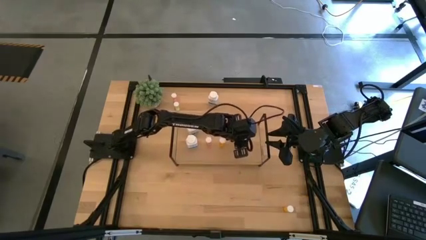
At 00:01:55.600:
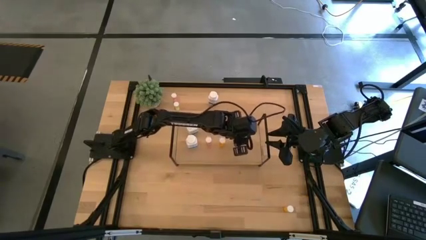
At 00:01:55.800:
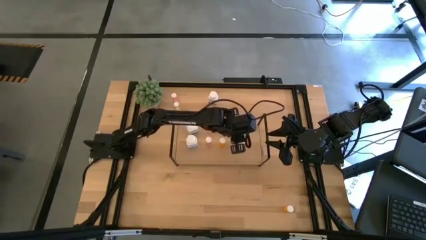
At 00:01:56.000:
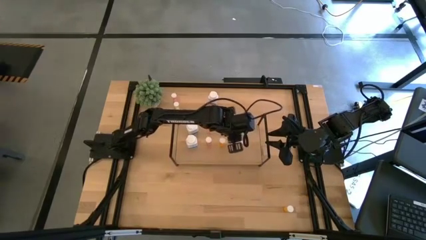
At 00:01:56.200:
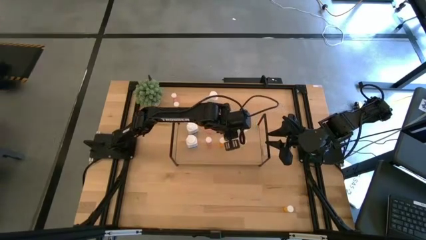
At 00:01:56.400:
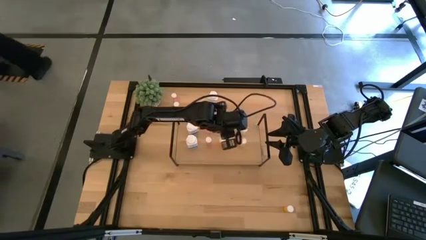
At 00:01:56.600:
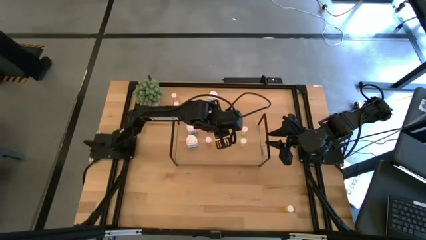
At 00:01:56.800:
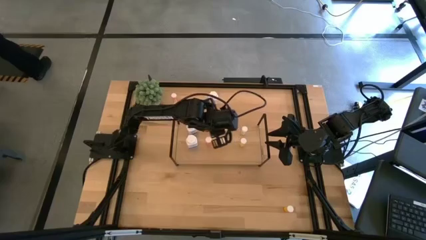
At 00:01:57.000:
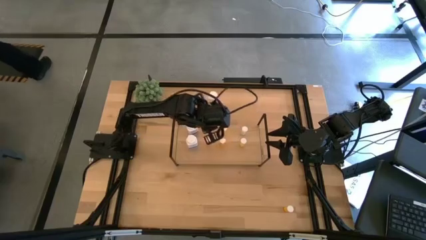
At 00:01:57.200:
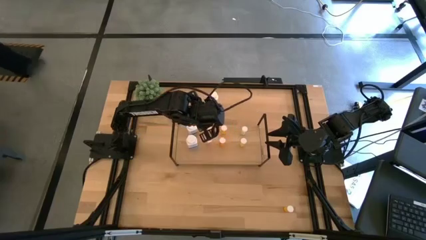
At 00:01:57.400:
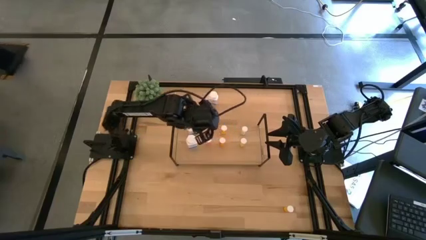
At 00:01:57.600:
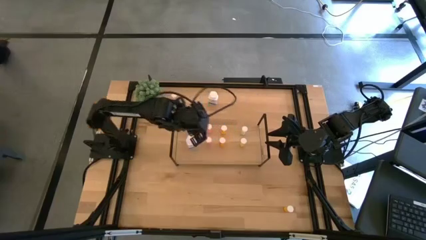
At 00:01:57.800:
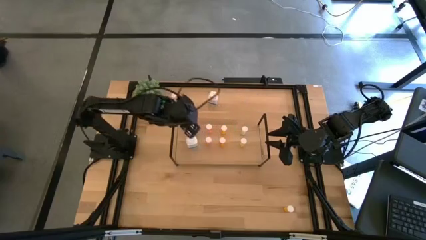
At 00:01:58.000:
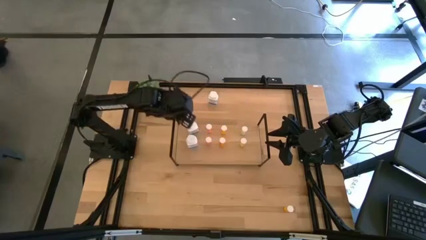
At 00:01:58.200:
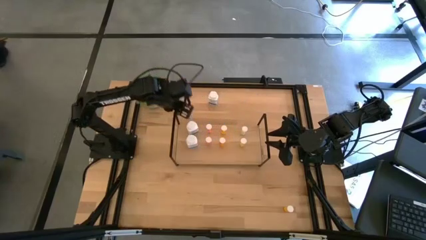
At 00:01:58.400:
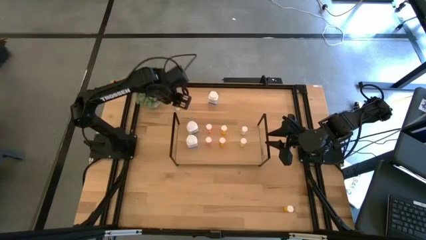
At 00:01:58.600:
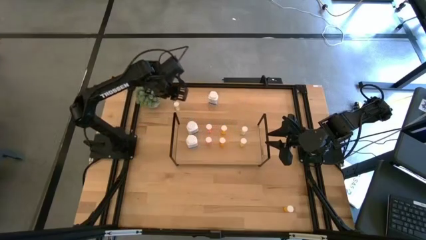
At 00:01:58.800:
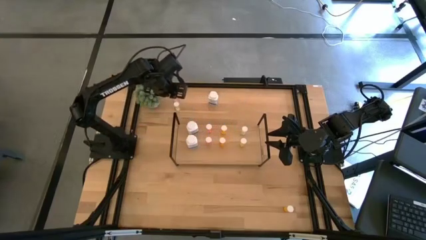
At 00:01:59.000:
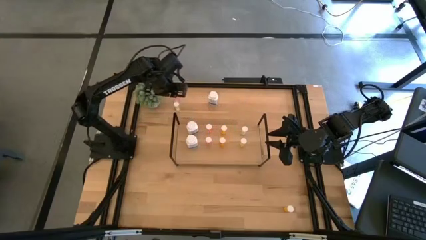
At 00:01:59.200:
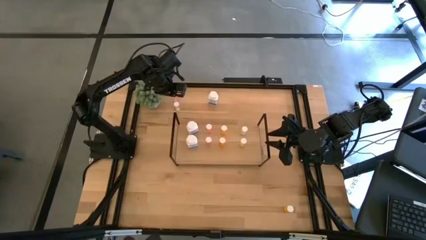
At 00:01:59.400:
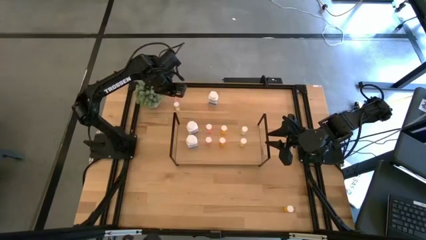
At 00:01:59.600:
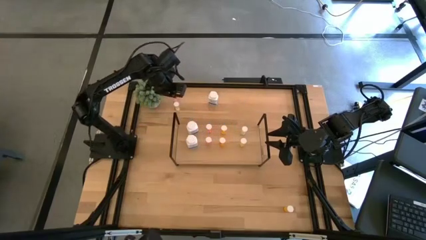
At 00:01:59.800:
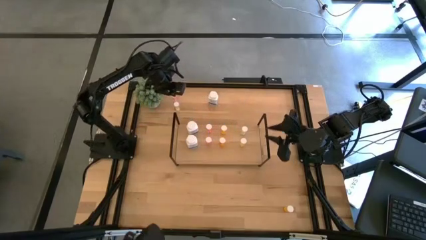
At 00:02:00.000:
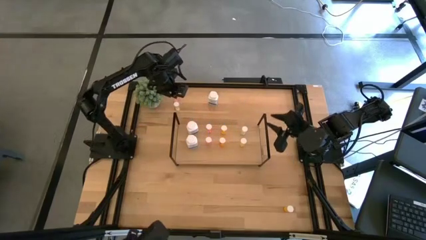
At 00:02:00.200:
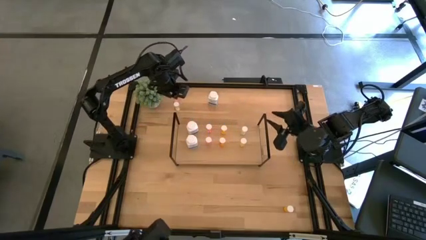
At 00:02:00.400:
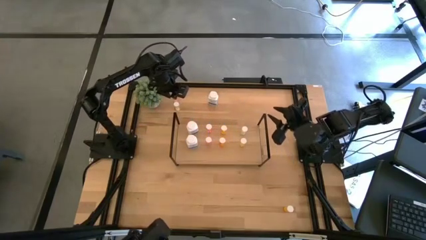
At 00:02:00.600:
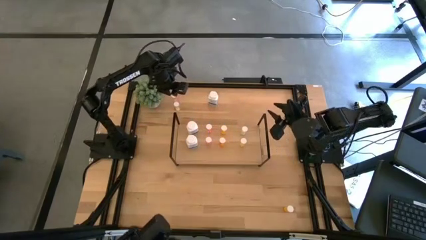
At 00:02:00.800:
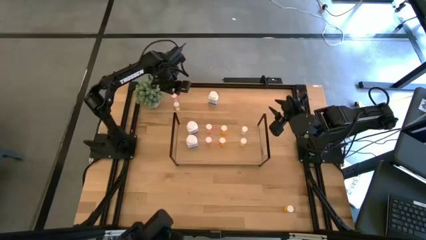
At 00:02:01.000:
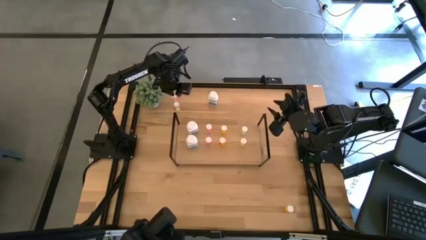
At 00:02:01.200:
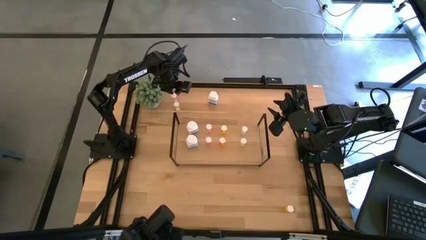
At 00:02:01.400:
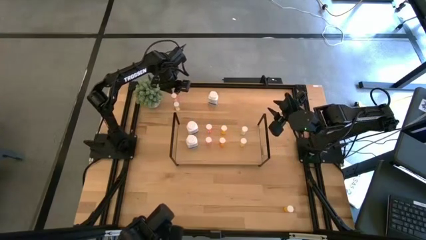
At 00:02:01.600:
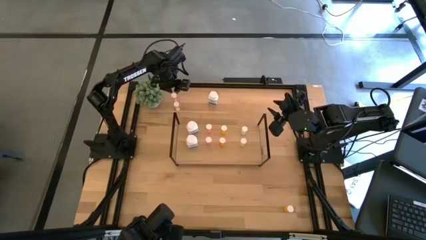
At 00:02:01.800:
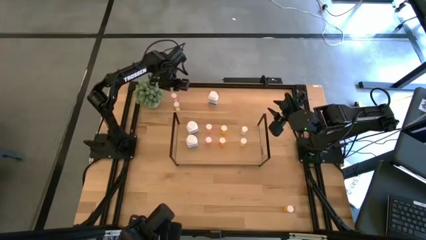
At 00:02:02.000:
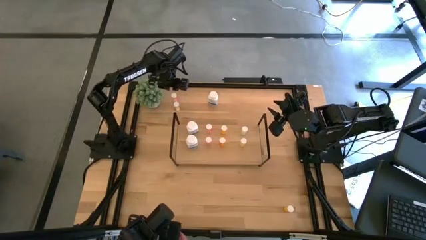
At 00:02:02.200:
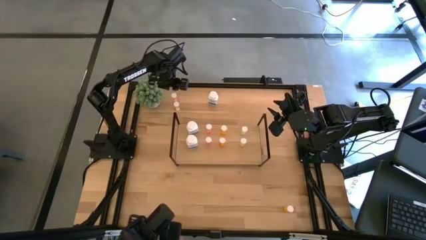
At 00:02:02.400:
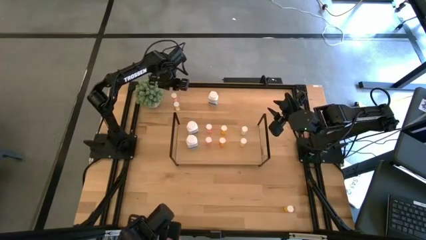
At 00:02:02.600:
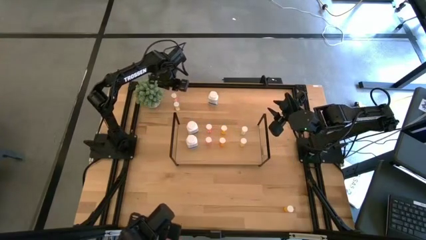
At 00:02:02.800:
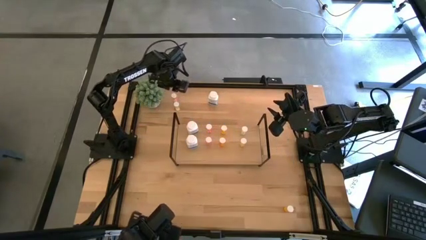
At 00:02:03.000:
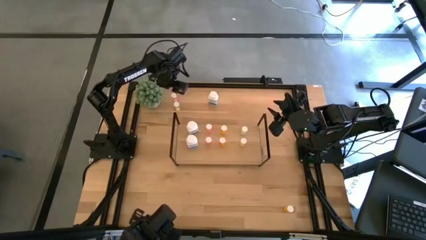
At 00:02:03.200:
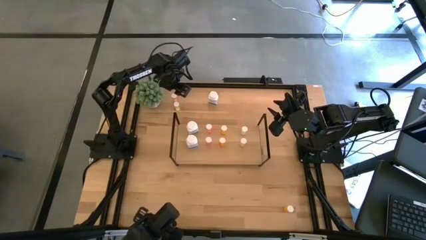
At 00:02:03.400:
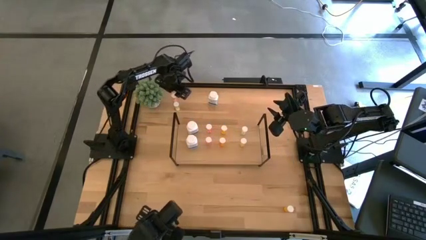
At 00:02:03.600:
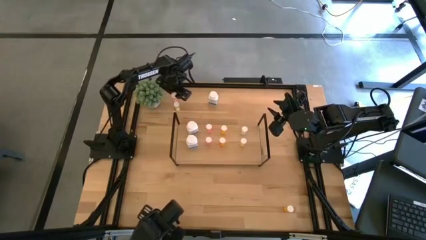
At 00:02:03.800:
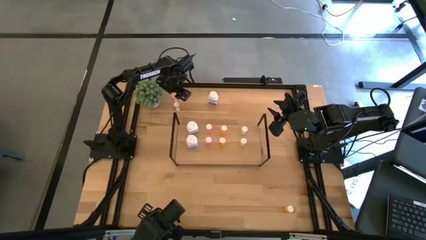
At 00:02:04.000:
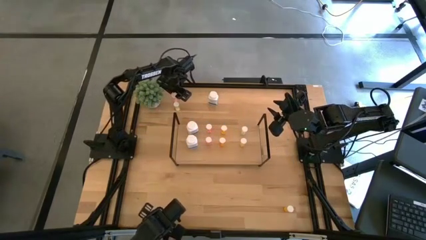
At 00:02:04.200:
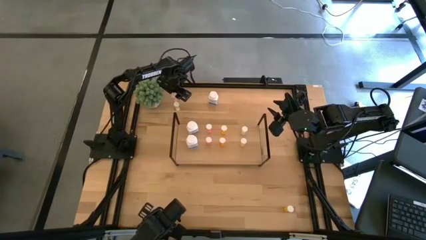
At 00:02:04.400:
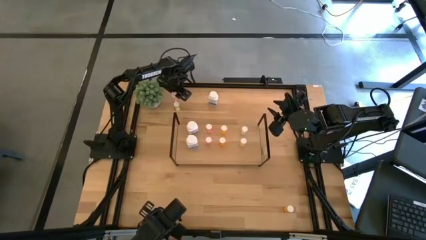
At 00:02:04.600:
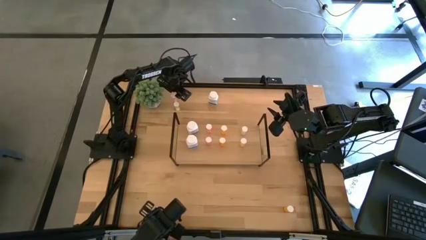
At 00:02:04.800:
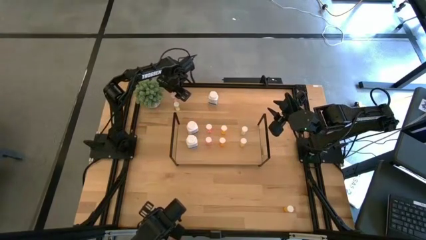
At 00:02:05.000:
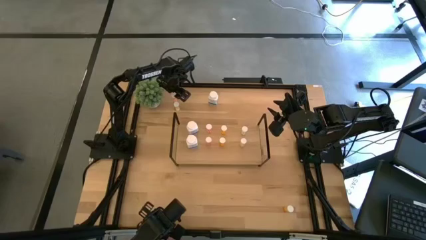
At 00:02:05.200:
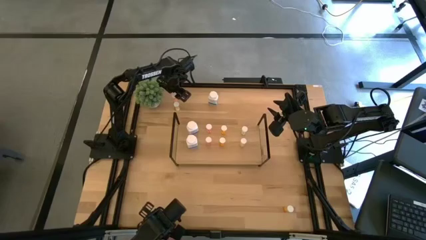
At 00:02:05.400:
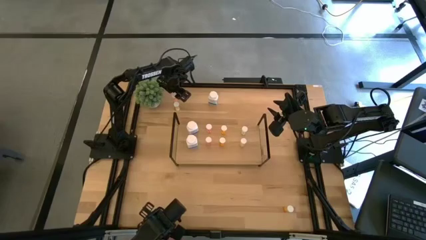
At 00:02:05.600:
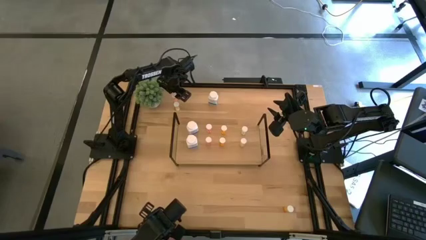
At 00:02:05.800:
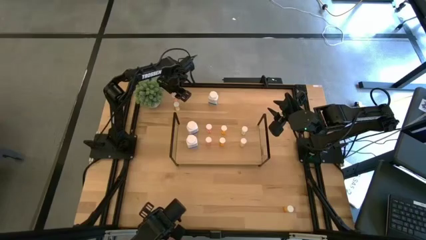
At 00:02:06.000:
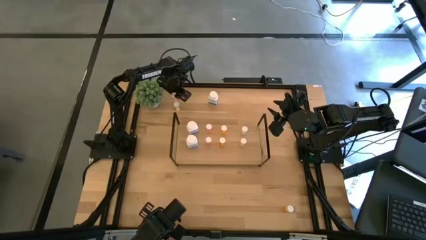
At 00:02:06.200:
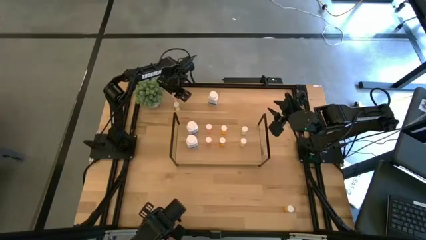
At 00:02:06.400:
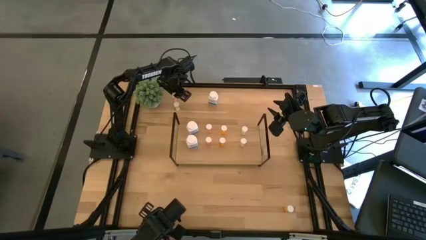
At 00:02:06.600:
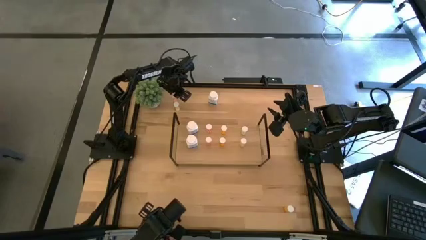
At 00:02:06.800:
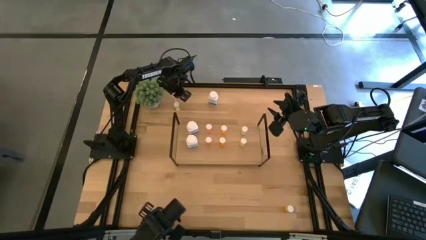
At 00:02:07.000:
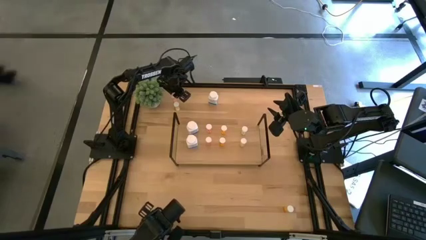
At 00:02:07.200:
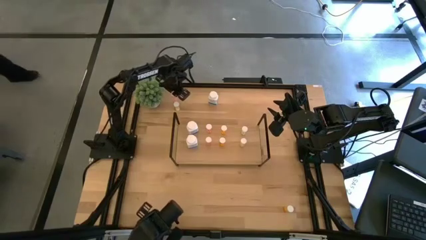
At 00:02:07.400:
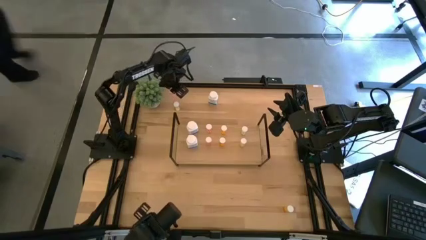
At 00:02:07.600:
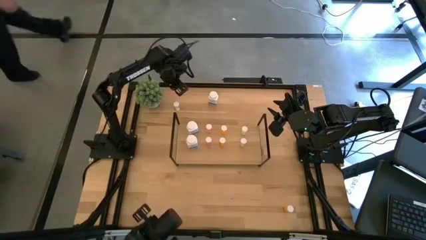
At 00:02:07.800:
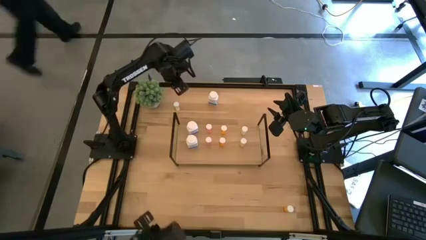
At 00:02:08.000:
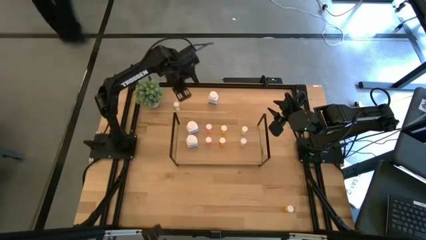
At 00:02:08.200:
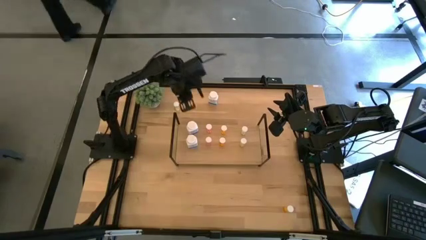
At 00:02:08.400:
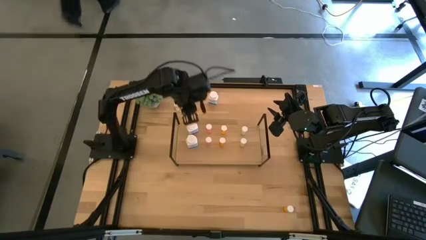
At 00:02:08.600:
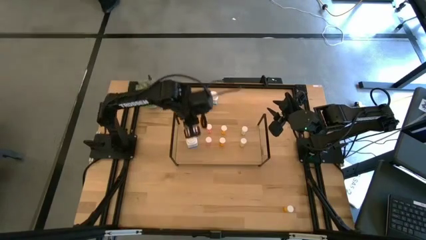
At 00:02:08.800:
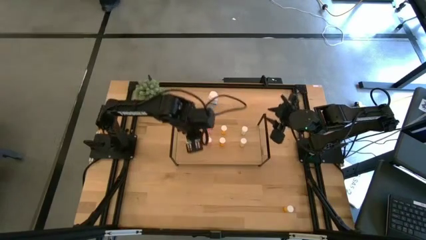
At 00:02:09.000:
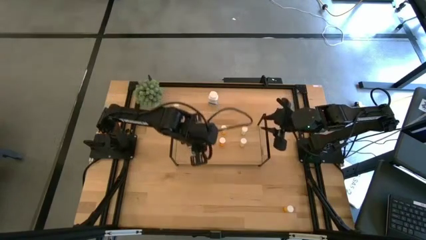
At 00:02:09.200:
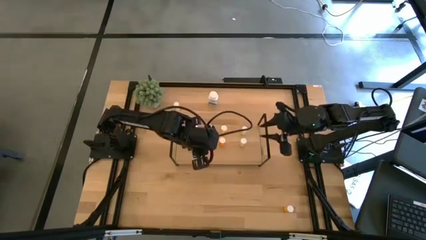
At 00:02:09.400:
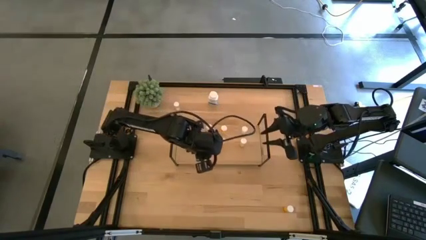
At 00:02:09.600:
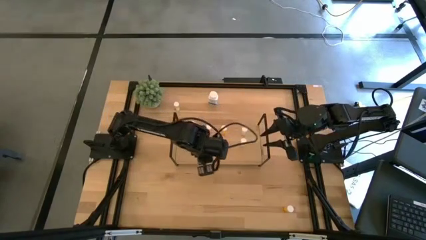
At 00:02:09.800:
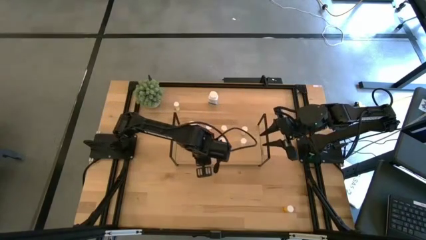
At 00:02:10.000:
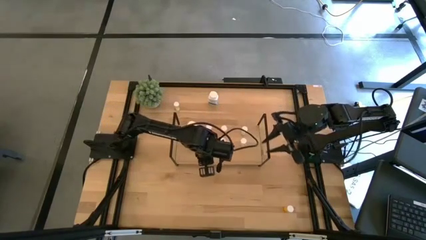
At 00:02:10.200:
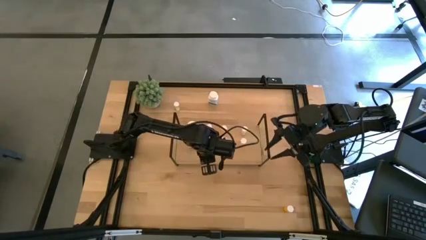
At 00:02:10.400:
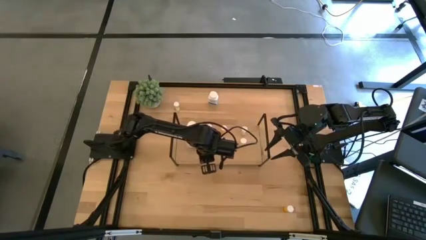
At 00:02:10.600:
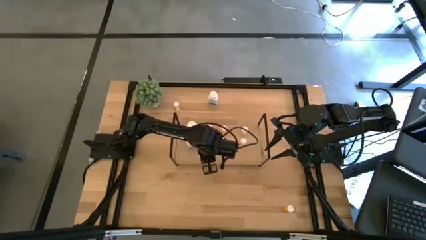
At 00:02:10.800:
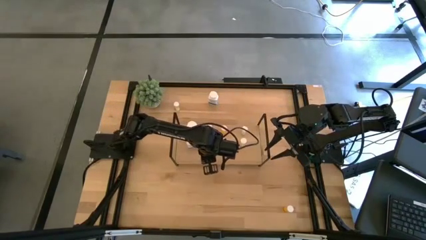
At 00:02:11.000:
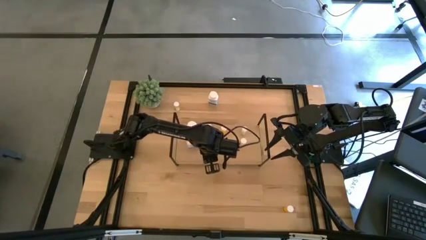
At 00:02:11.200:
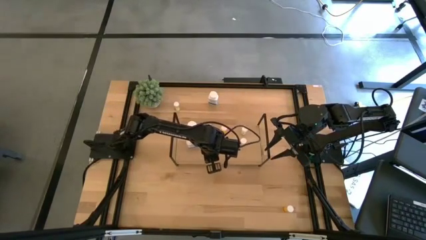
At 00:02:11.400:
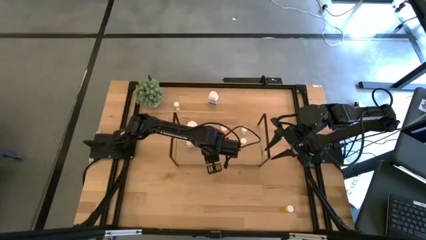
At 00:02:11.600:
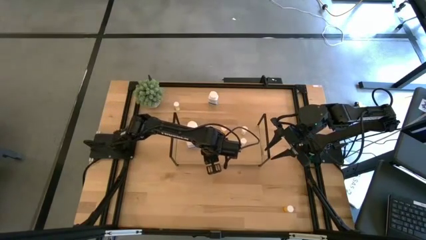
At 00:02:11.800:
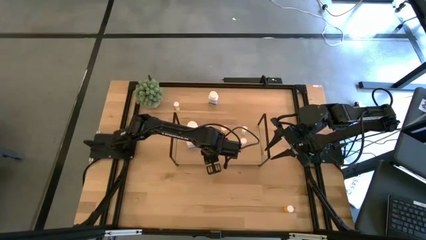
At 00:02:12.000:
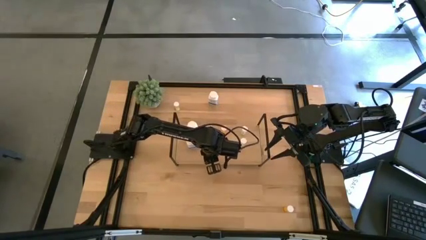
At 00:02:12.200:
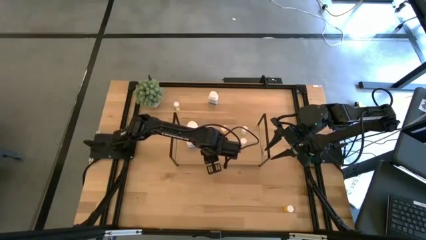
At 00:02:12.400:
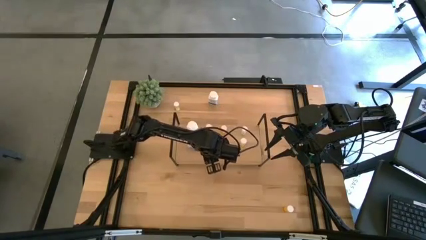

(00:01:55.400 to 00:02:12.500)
Task: Pick and place medicine bottles onto shelf by color
Put the pink pill bottle on the shelf aligned with the other pink pill bottles
